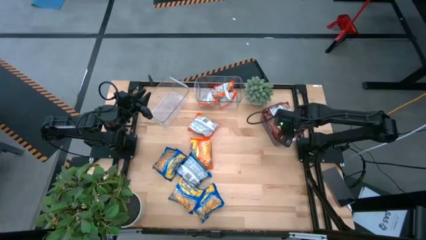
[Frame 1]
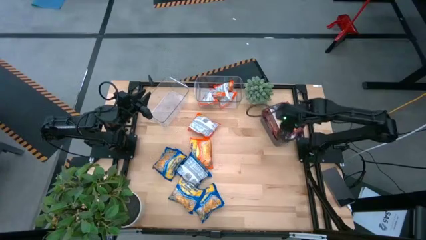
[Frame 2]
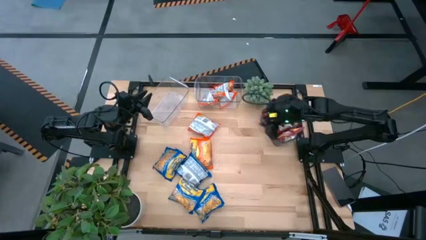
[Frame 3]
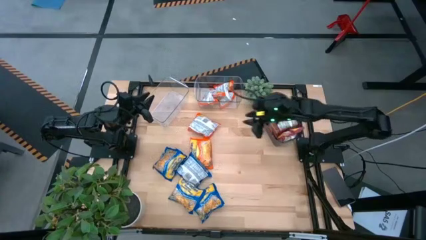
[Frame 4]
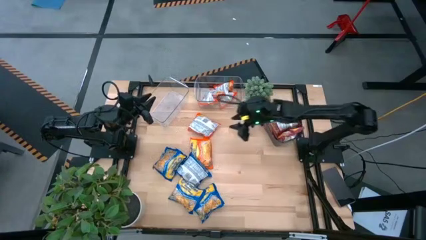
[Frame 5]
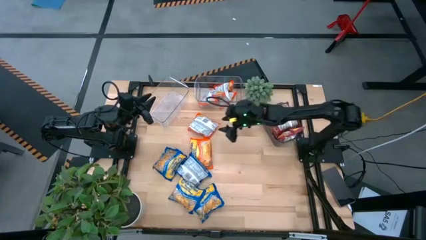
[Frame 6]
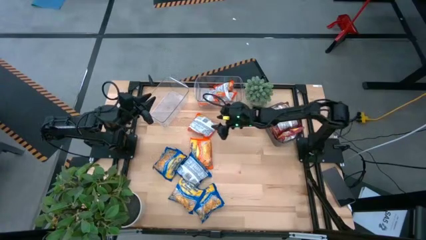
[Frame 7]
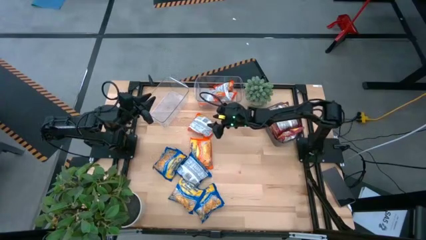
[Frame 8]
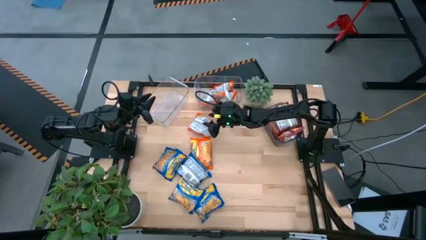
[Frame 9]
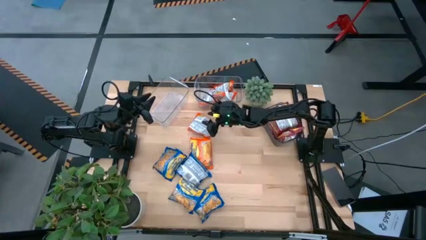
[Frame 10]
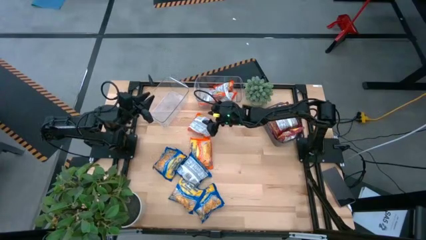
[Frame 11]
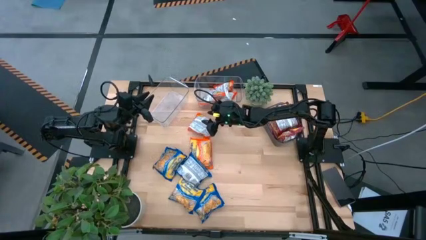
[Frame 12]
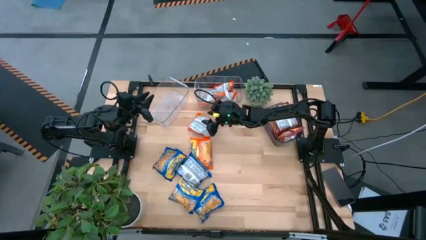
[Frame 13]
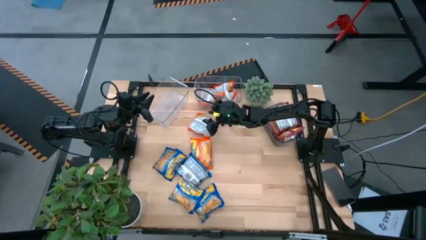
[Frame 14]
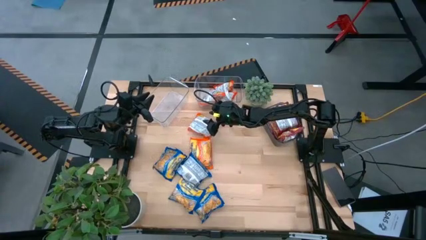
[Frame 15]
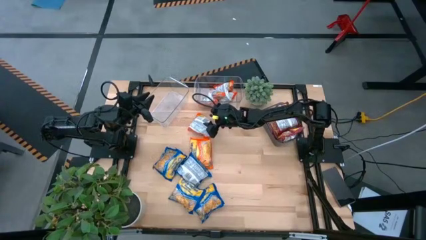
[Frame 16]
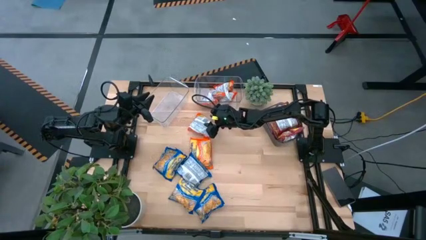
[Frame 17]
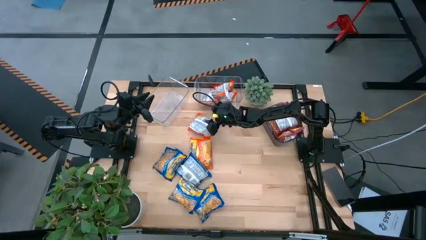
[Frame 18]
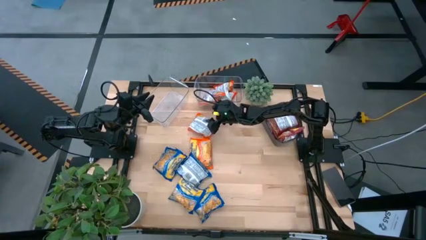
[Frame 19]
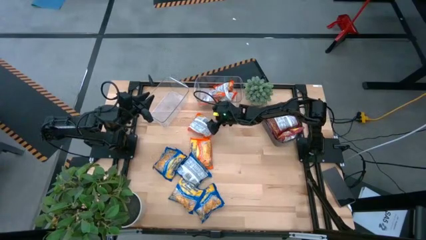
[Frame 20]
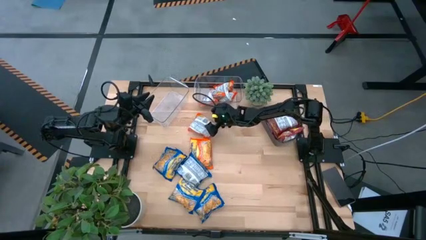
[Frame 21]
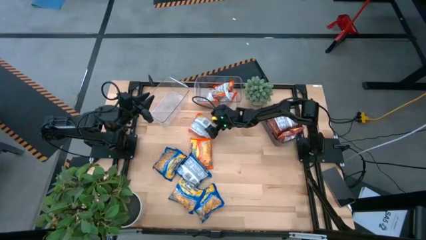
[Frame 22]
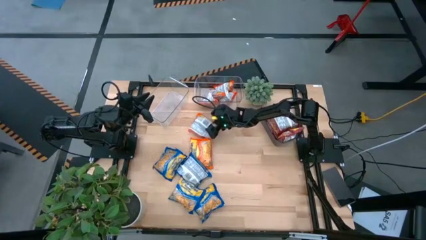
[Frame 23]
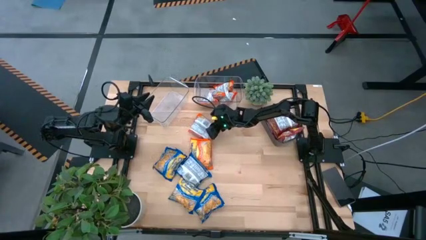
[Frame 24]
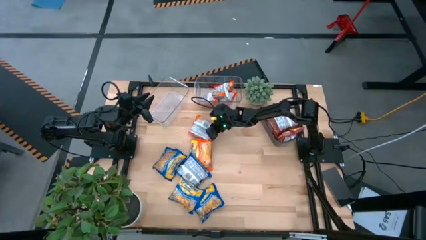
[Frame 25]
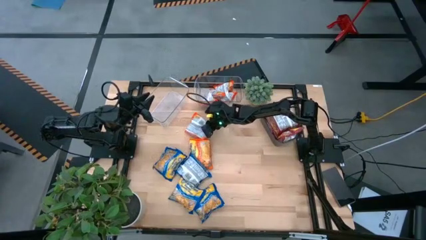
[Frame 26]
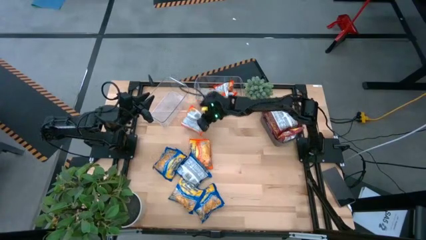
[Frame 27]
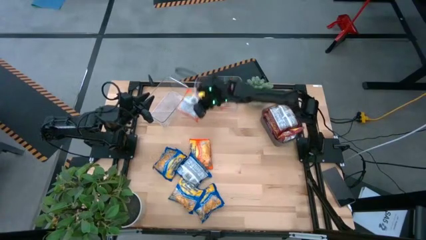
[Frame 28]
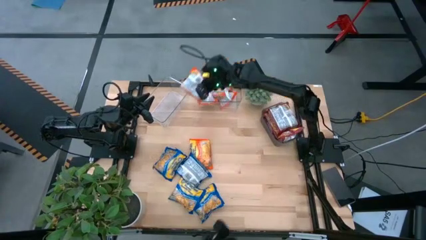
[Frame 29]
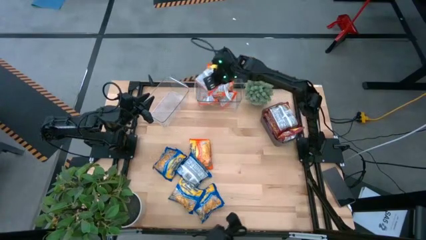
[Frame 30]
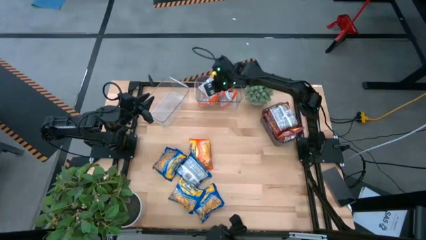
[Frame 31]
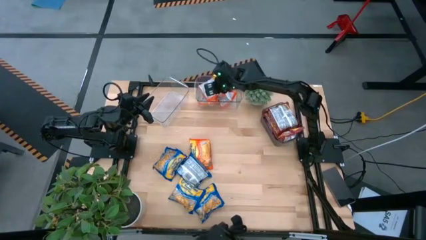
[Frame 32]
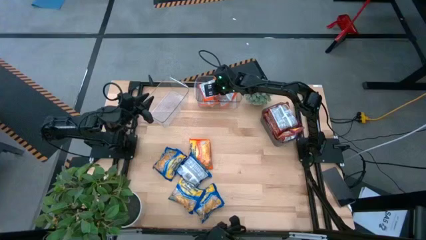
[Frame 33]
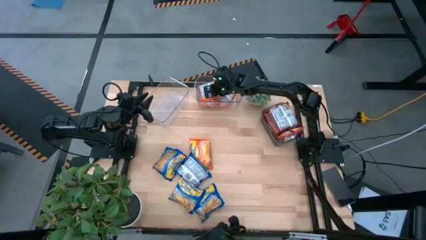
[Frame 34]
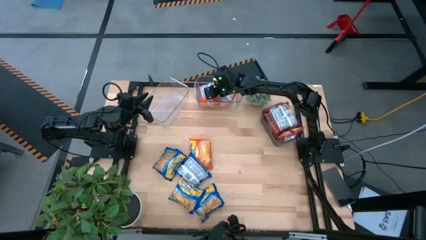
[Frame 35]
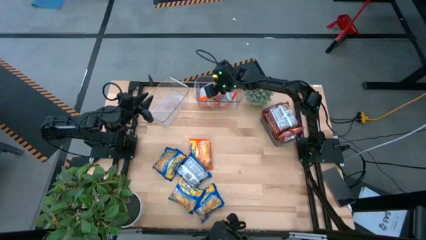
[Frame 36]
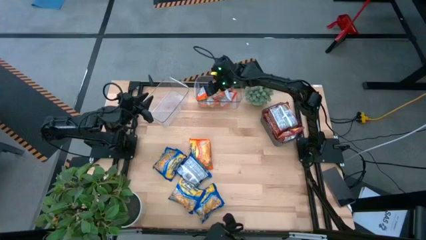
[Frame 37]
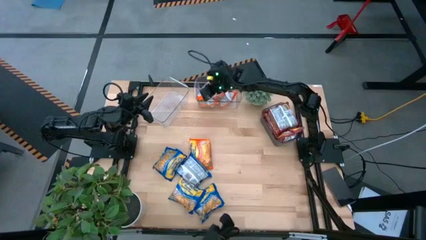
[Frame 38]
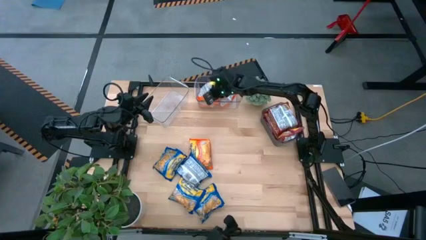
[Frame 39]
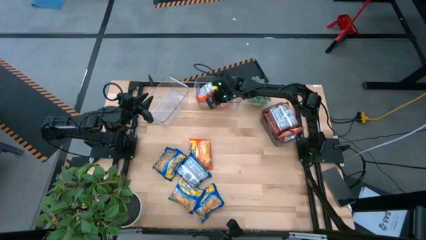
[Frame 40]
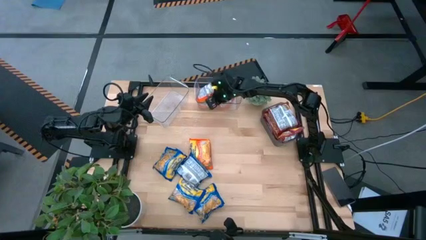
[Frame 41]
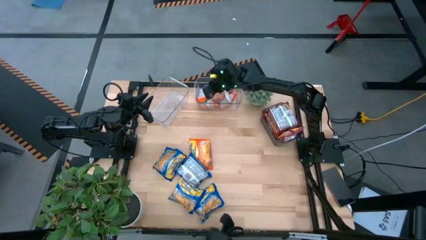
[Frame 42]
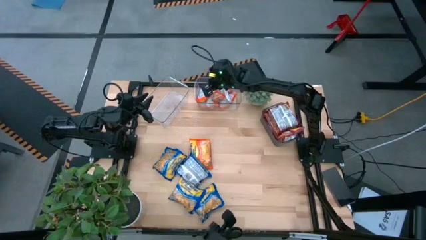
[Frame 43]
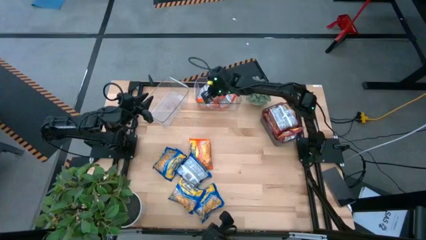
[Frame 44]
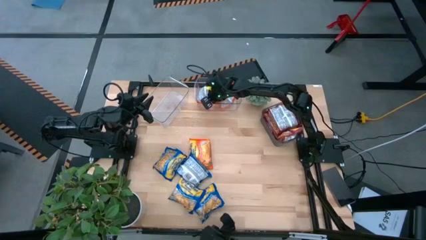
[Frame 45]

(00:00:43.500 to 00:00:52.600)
Task: Sort Maruchan noodles
Put the orange noodle pack into the right transparent bin

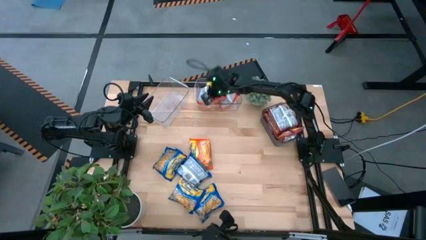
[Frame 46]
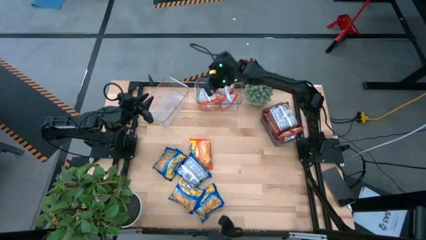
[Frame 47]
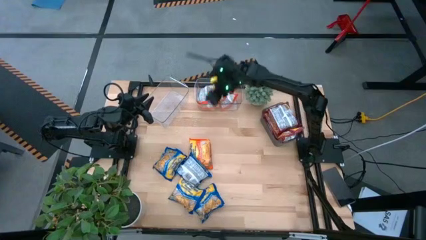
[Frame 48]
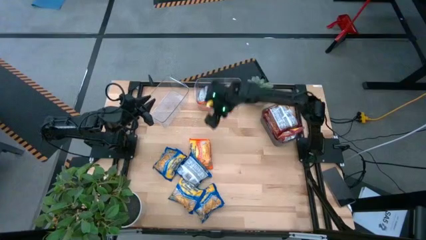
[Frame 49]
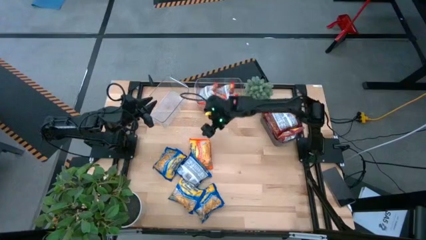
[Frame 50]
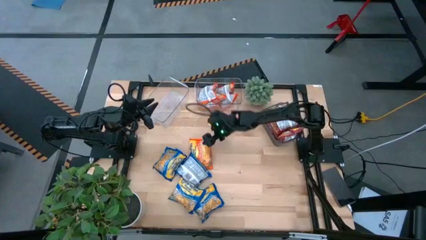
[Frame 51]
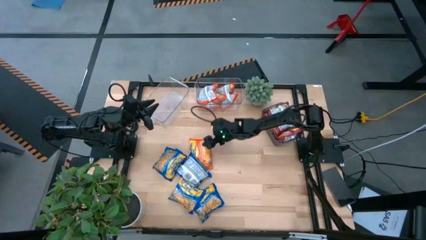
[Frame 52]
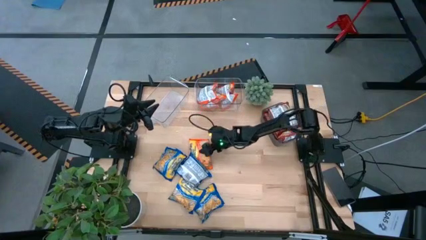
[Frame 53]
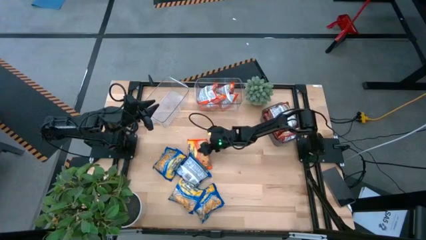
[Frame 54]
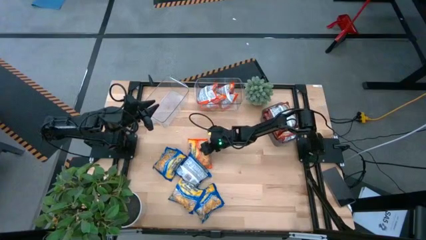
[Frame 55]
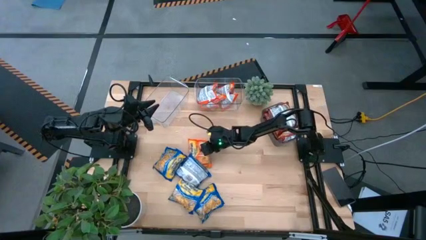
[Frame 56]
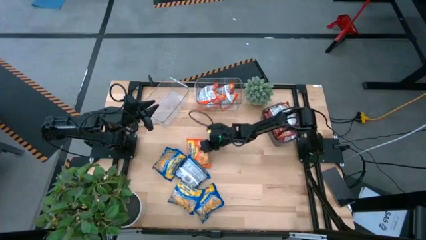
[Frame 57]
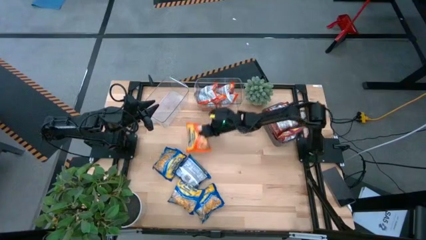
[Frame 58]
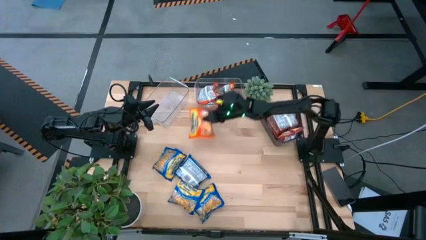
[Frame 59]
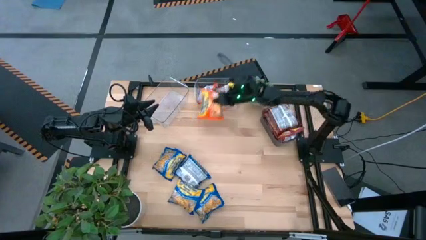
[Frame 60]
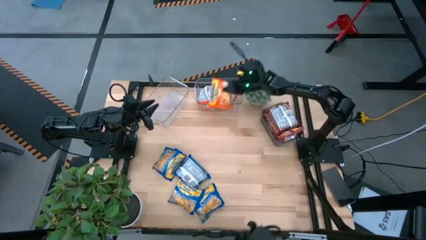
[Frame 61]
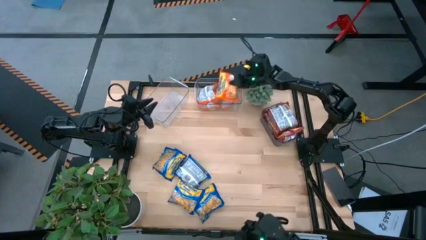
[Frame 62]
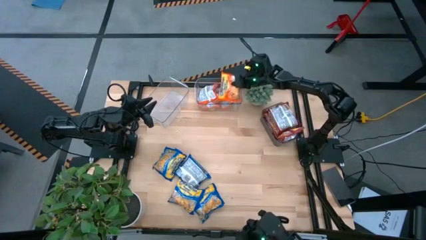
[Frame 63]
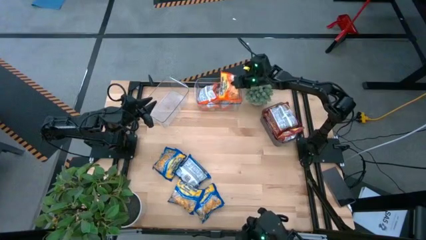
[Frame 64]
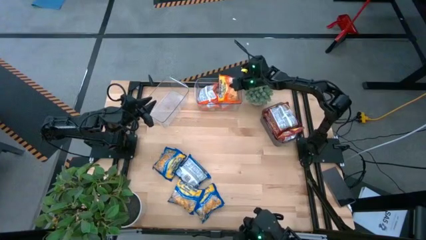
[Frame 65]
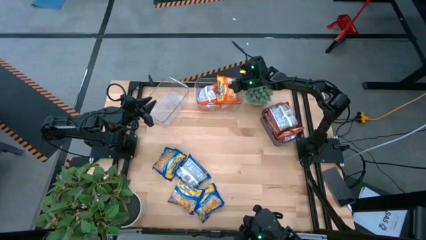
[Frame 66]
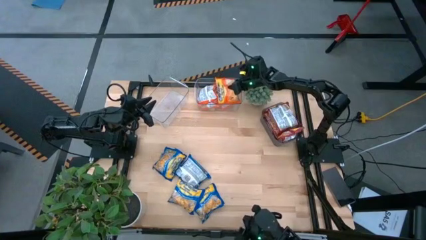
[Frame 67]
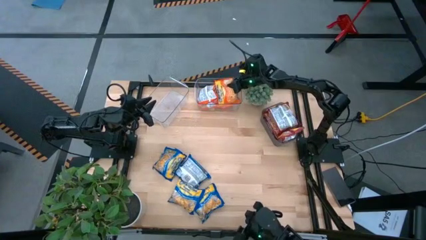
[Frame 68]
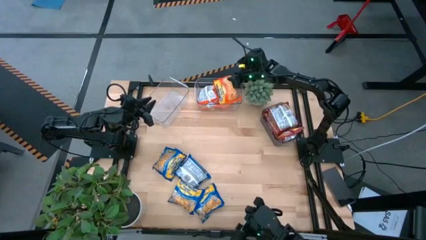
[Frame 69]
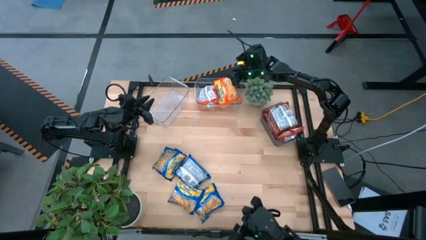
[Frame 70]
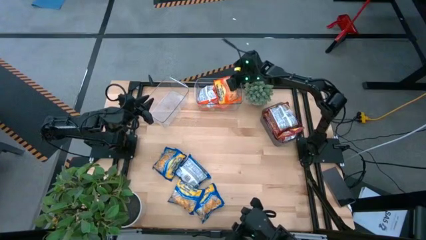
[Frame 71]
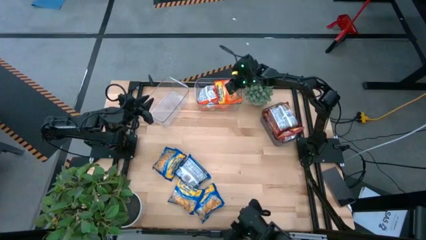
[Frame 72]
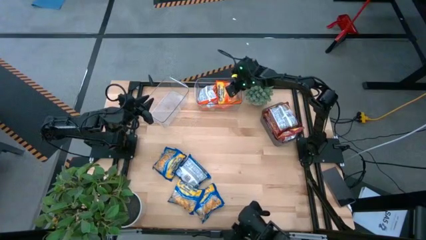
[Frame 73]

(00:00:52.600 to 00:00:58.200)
Put the orange noodle pack into the right transparent bin

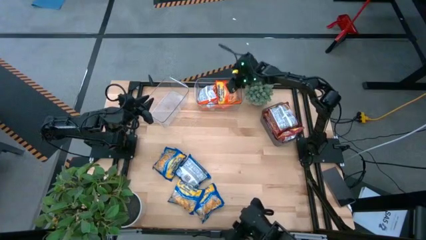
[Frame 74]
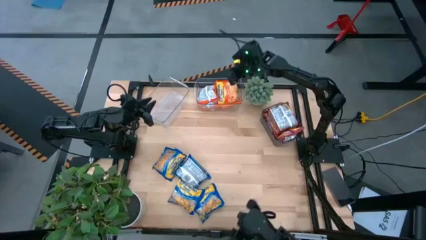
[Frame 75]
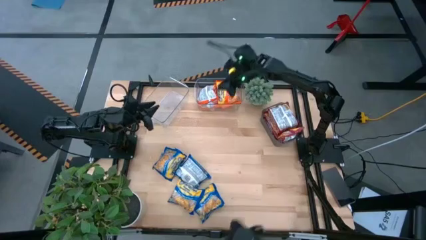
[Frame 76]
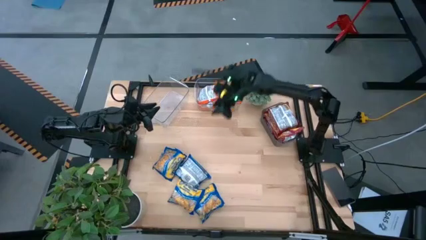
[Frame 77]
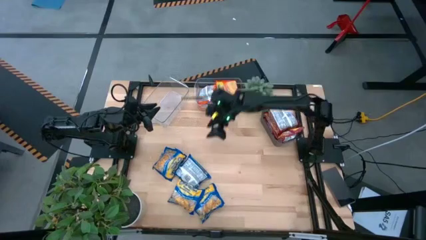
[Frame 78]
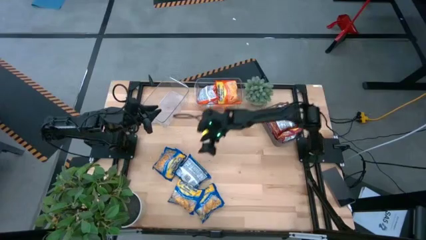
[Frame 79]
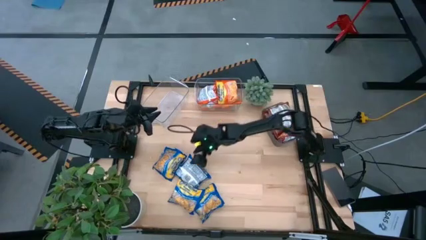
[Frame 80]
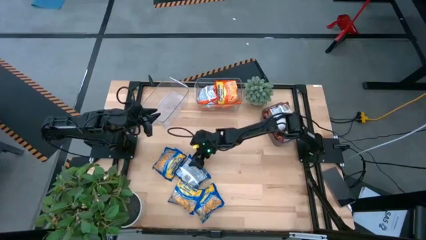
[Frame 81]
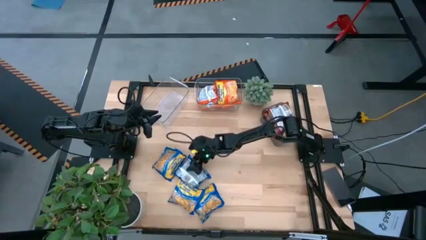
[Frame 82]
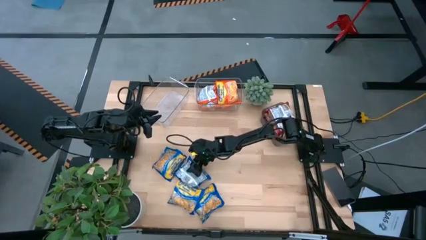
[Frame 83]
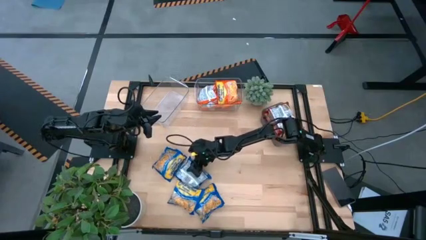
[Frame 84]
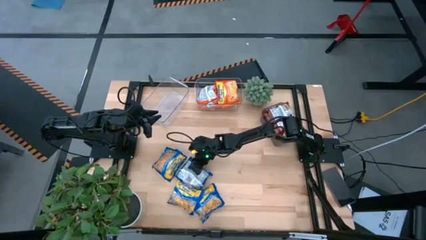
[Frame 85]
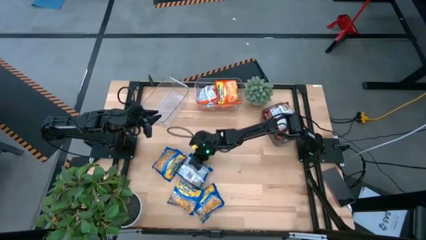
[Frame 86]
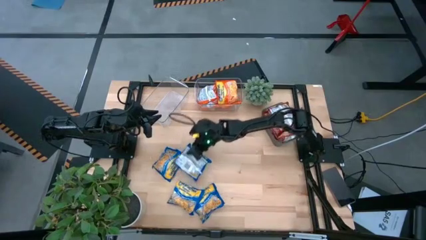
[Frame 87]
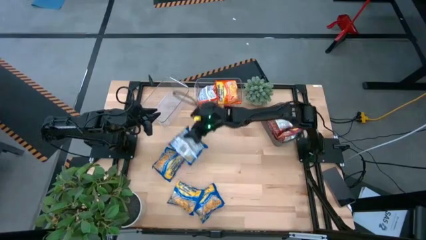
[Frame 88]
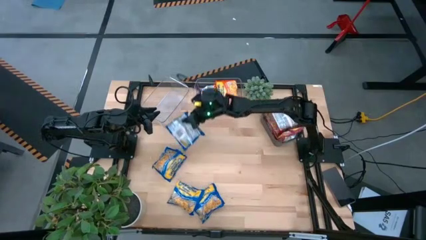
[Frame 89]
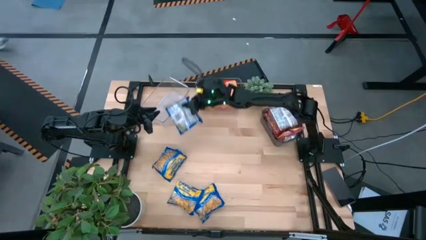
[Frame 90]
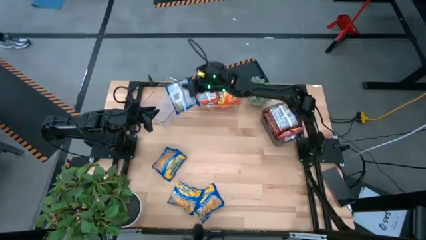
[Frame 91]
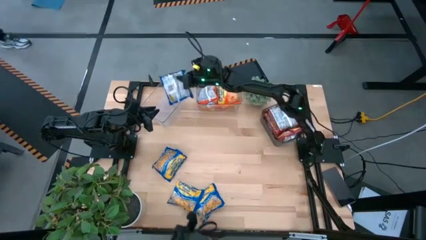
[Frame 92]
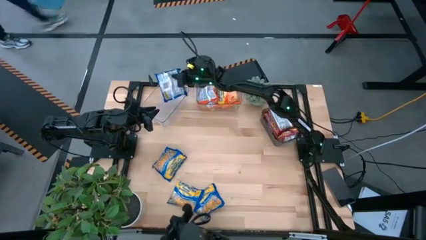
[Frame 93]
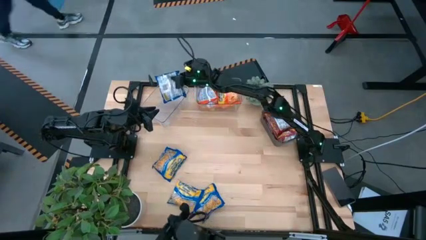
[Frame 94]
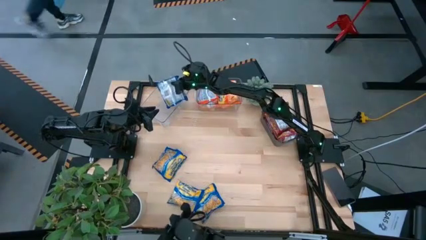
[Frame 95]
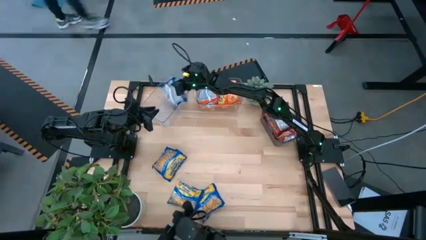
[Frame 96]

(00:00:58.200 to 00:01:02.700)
Put the blue noodle pack into the left transparent bin
